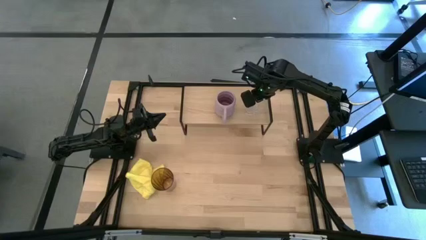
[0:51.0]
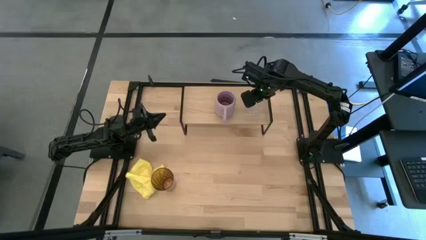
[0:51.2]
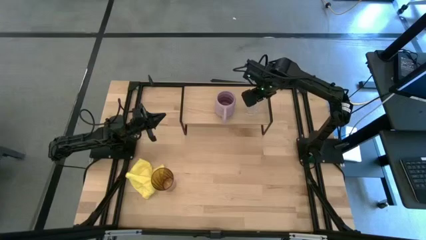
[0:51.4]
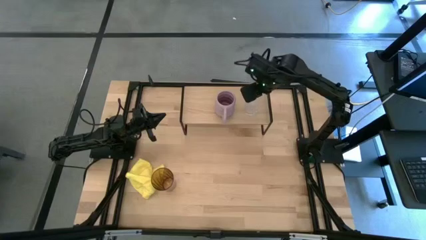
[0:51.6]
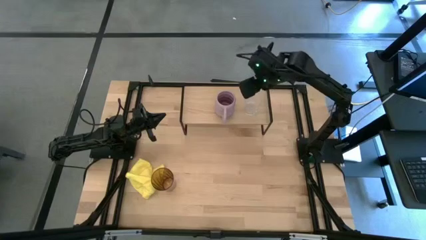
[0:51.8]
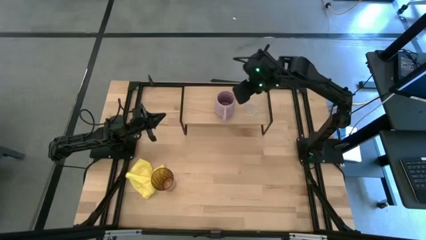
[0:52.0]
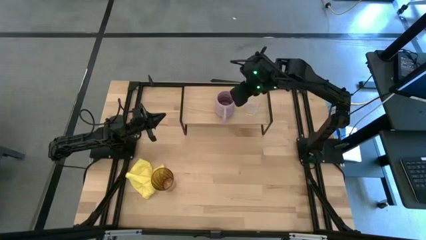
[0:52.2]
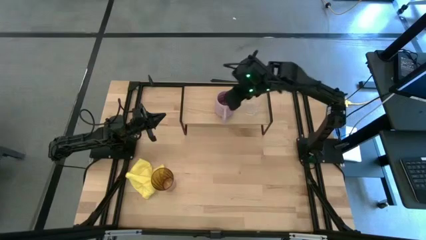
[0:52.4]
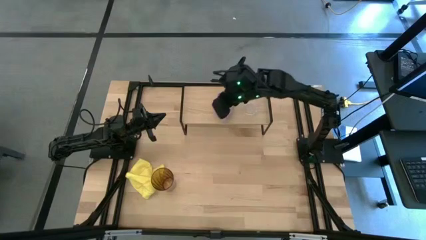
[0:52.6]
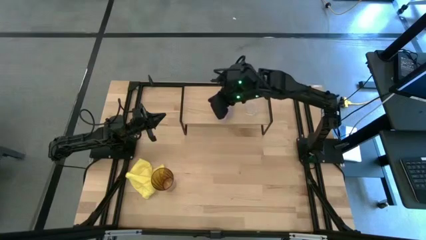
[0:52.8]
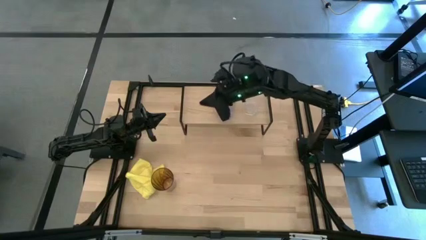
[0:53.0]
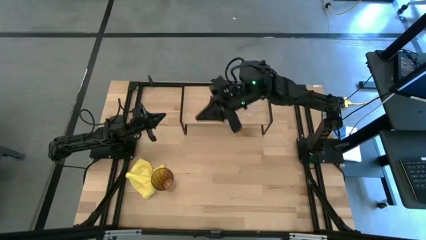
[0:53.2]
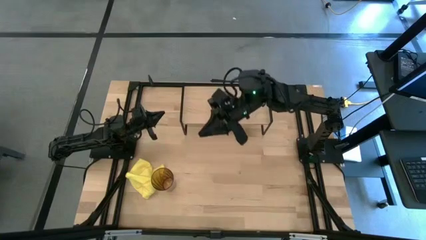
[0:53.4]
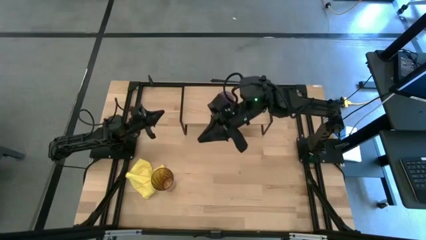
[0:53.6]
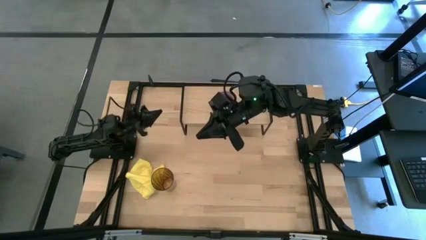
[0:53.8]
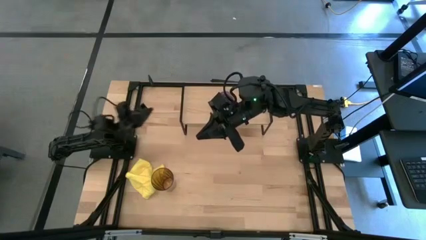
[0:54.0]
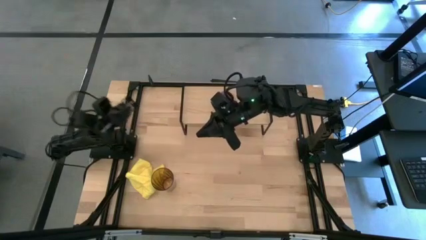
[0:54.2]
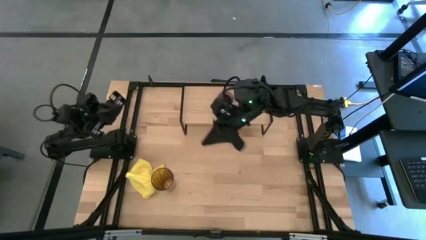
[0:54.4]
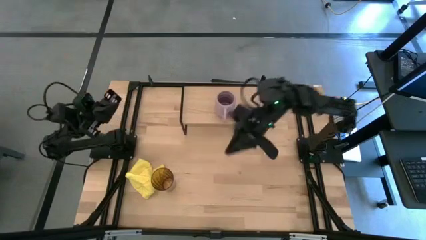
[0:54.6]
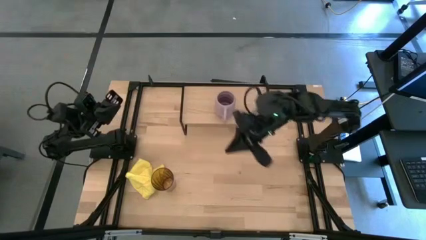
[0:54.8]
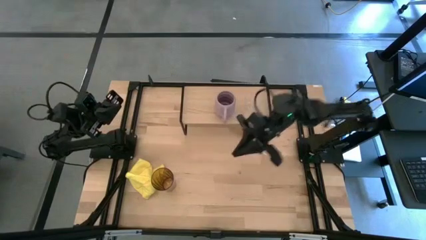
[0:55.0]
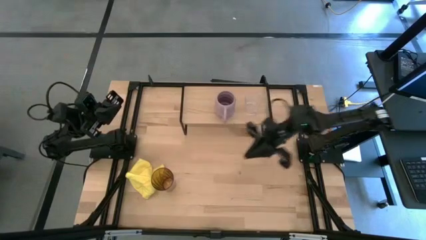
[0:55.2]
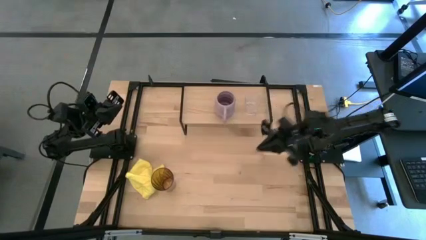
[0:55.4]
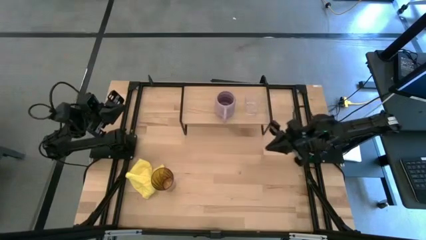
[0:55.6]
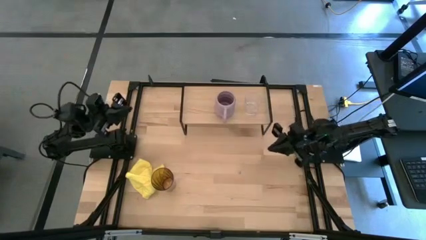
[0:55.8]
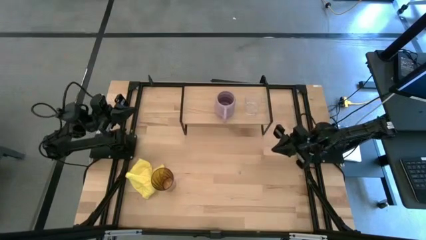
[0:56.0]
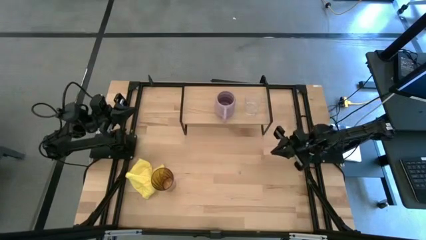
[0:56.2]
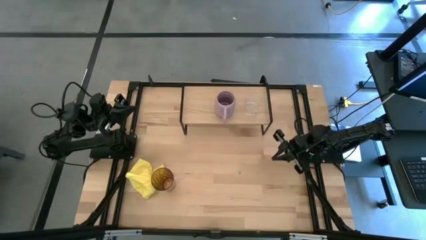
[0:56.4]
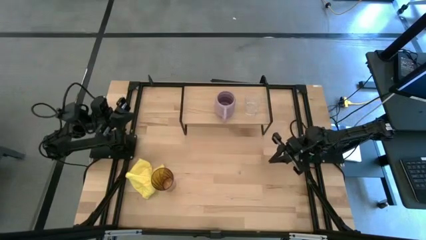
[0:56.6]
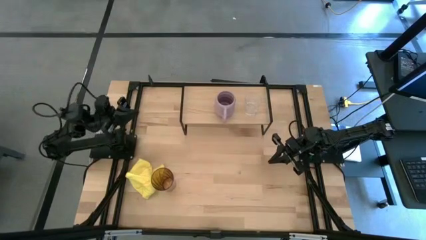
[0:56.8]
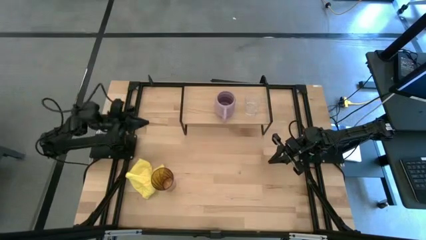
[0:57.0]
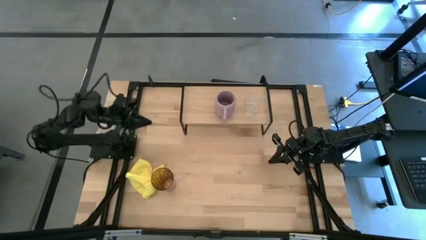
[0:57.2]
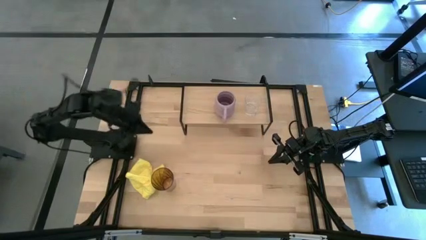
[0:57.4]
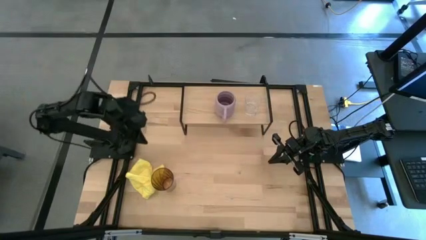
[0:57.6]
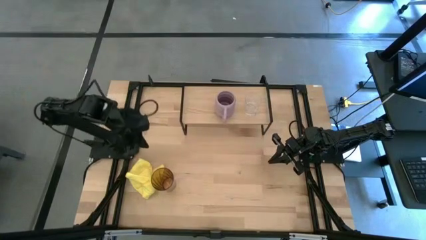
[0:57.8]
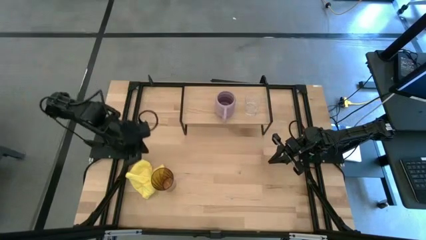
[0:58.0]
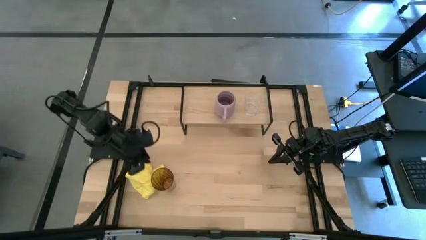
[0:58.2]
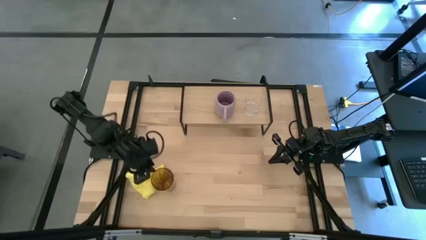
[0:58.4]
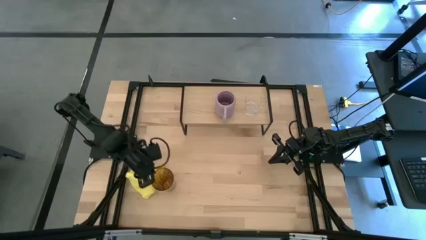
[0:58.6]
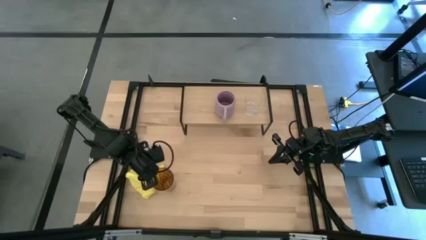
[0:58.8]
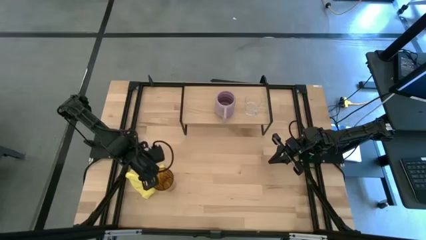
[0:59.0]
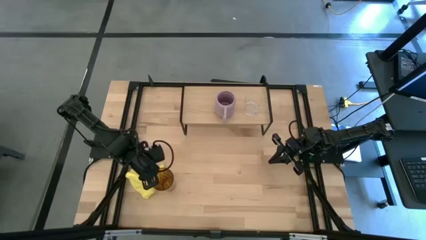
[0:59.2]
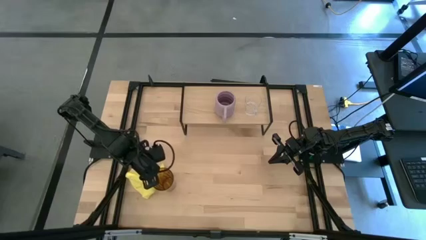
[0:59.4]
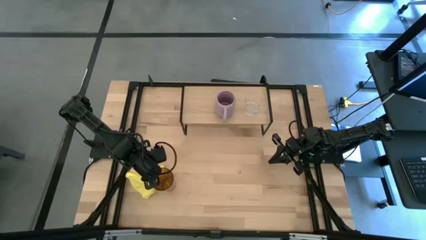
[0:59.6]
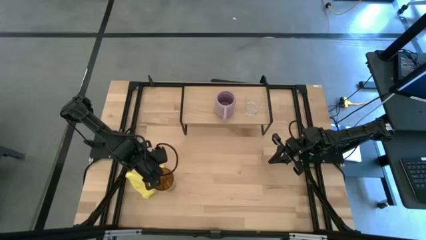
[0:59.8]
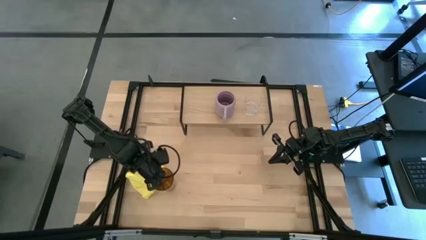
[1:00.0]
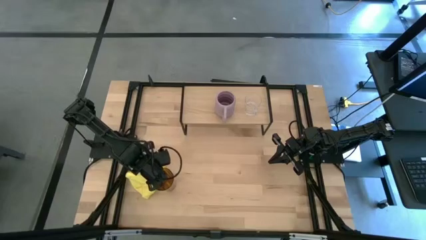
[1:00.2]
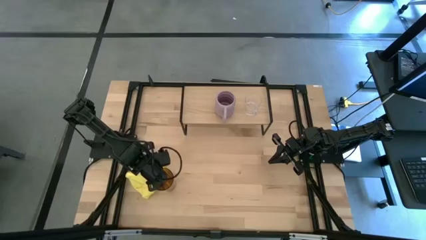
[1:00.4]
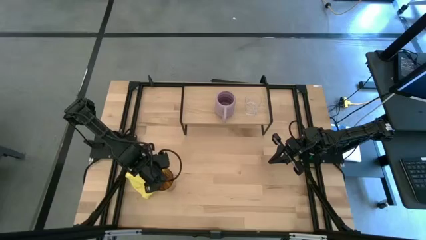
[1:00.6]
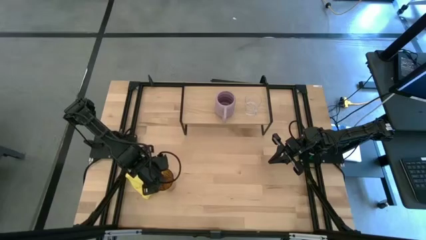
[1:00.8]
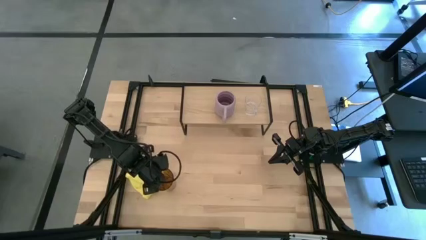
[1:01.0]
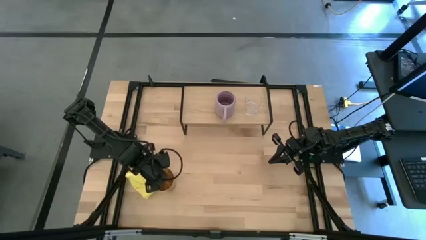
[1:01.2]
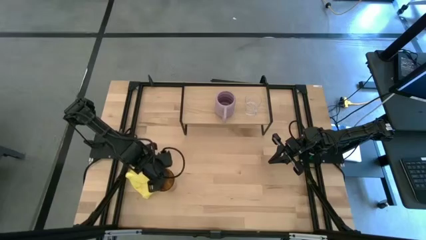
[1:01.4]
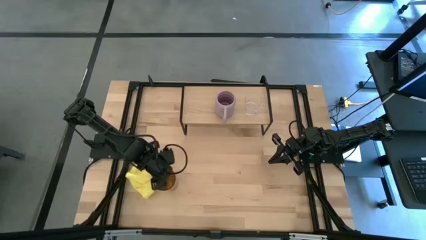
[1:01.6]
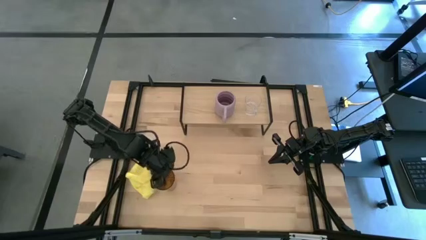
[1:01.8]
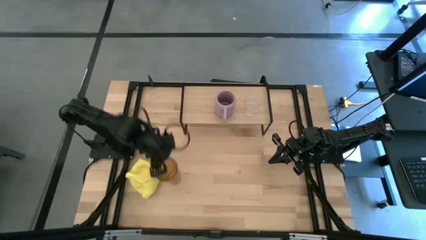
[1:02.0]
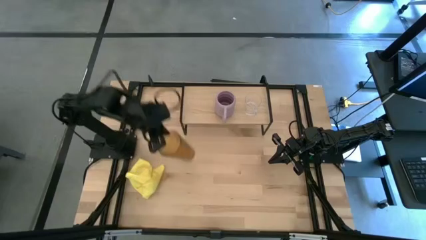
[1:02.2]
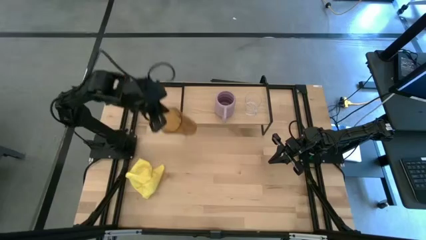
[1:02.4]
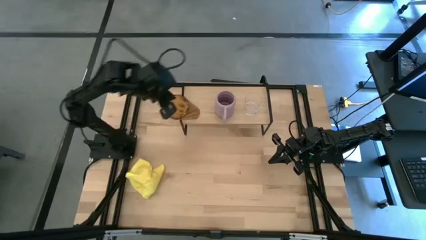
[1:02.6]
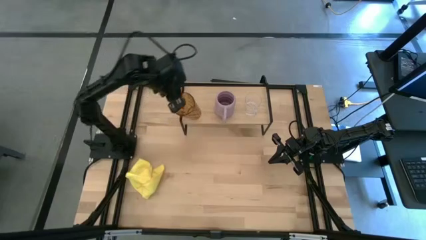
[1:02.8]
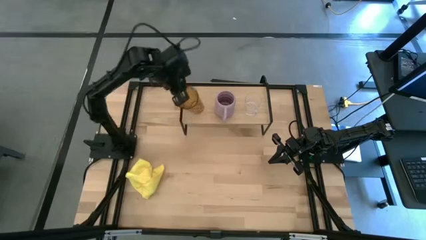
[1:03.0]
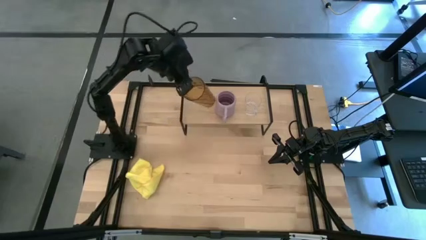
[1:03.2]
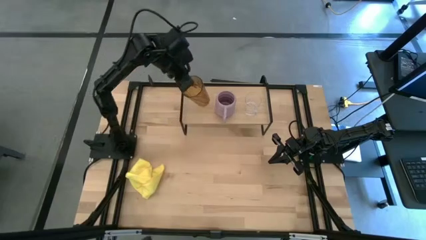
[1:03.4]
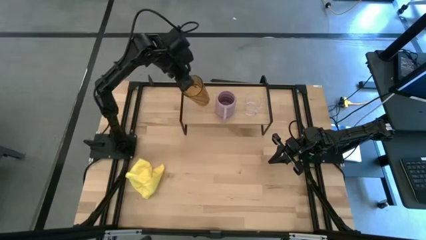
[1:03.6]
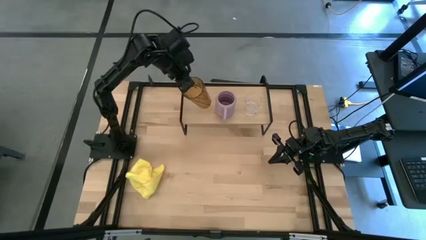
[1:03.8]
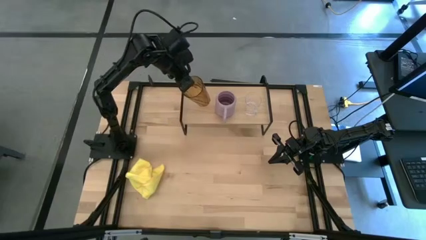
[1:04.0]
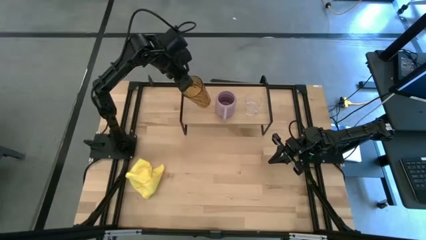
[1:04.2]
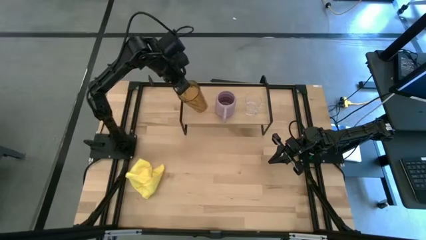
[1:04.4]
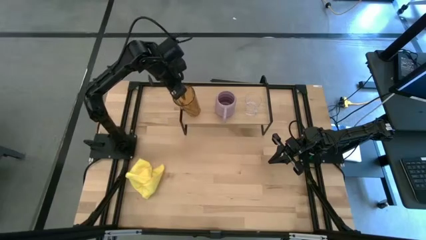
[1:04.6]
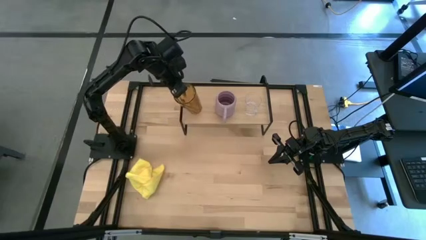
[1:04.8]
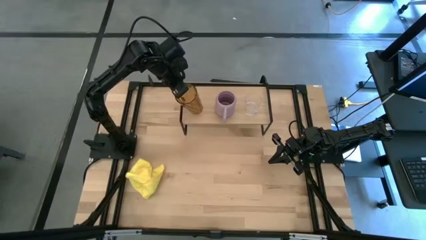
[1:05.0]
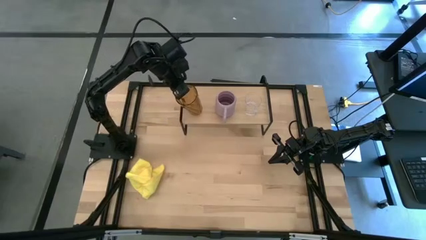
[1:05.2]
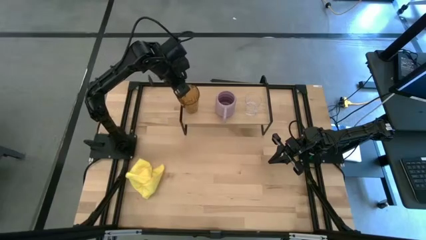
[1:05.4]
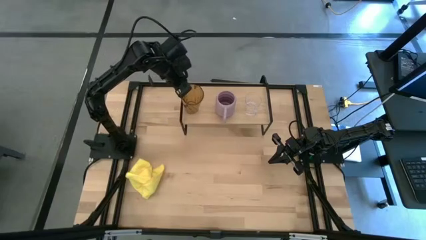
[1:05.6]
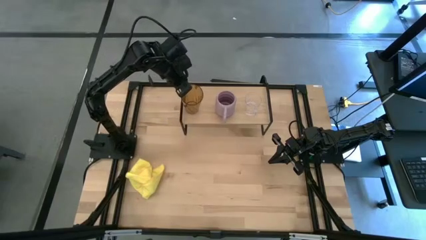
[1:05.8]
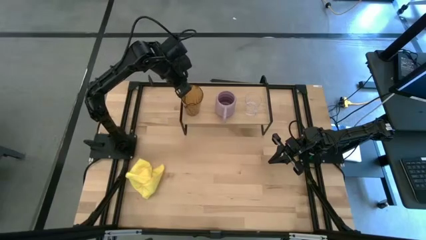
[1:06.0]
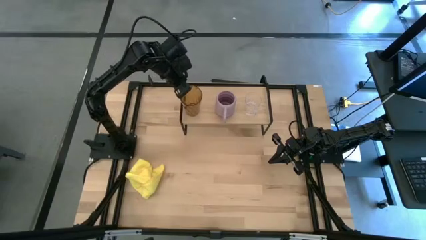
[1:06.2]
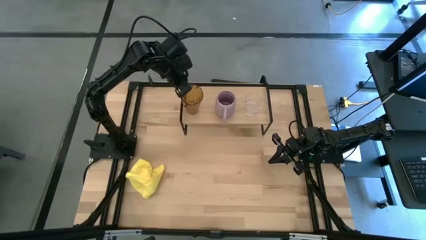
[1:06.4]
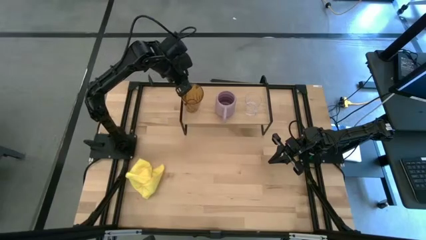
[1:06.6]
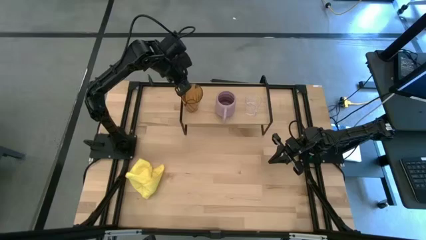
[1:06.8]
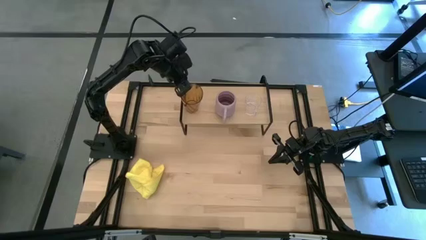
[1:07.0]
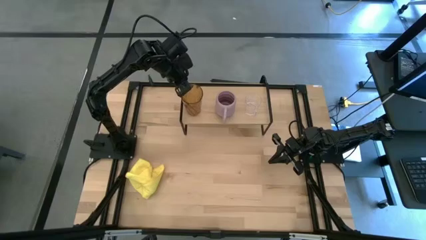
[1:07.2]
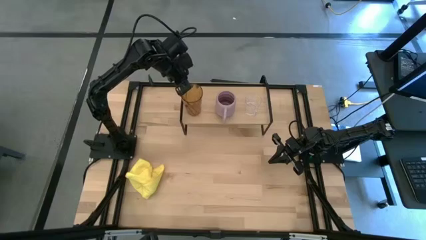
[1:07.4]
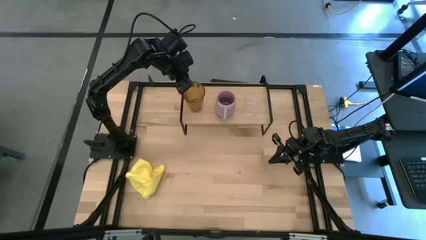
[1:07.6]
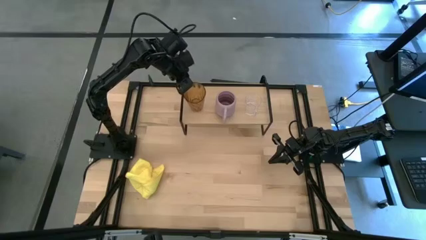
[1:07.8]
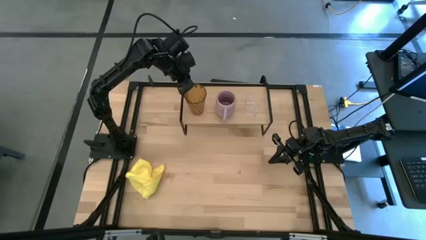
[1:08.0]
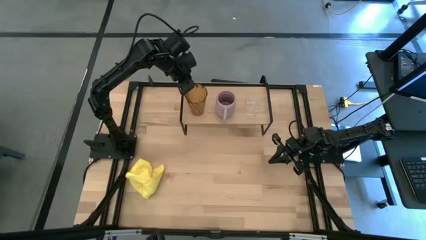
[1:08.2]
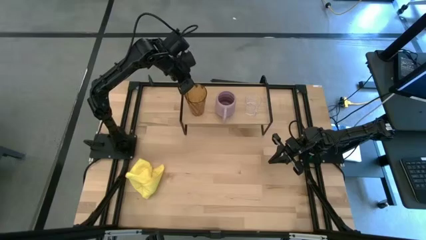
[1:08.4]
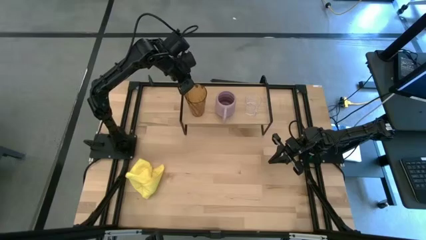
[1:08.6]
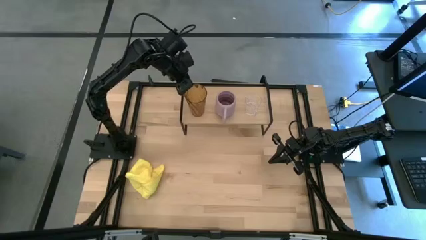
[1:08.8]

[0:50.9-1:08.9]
Task: Stack small to large cups/mugs on shelf
Put the brown glass on the shelf
